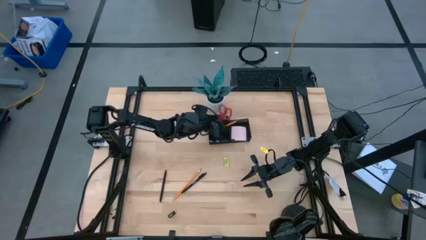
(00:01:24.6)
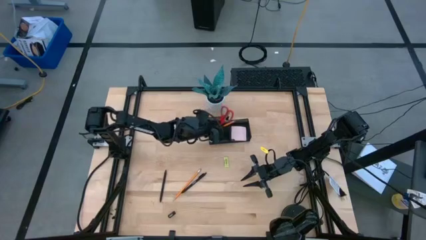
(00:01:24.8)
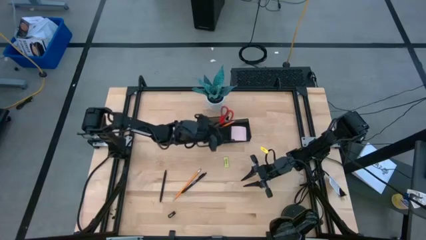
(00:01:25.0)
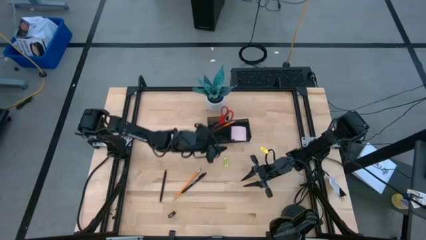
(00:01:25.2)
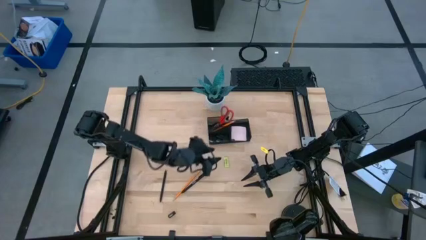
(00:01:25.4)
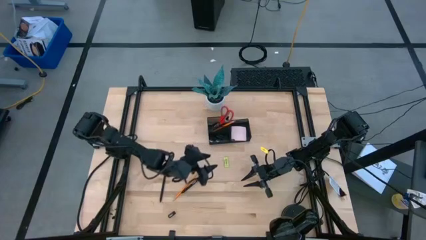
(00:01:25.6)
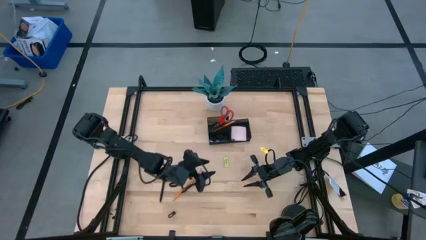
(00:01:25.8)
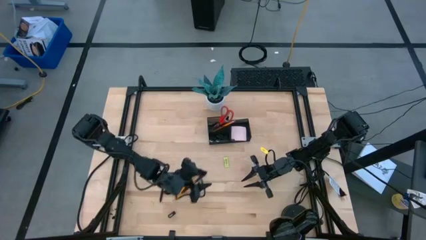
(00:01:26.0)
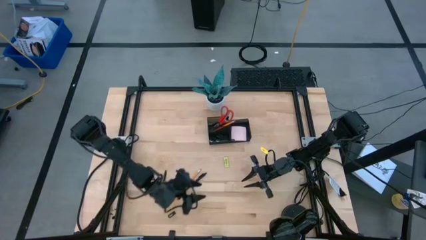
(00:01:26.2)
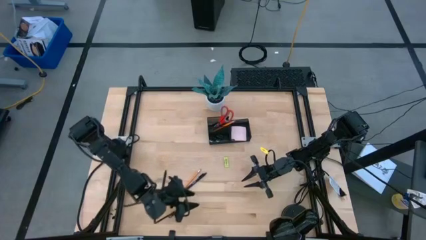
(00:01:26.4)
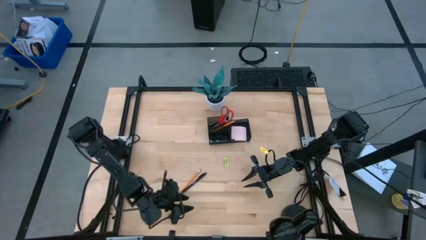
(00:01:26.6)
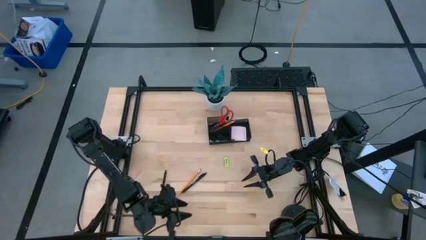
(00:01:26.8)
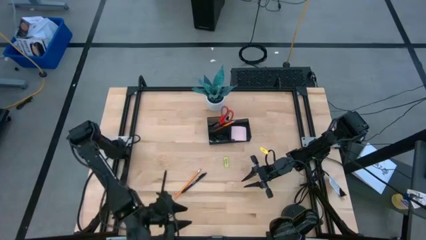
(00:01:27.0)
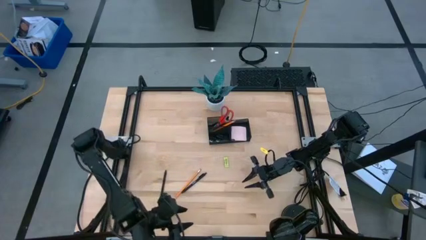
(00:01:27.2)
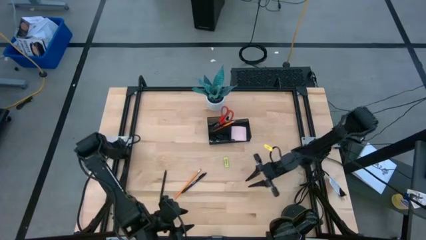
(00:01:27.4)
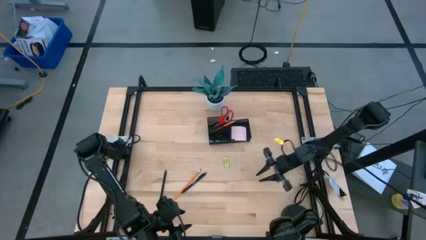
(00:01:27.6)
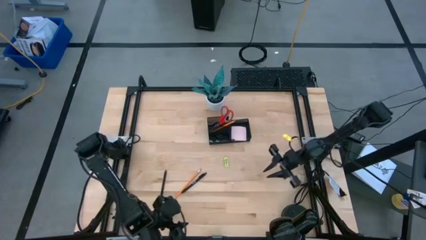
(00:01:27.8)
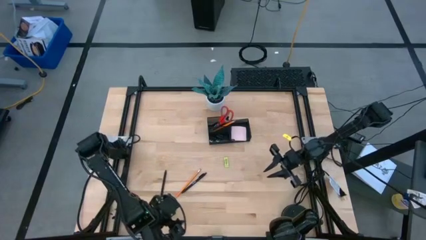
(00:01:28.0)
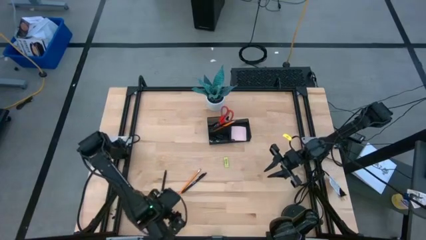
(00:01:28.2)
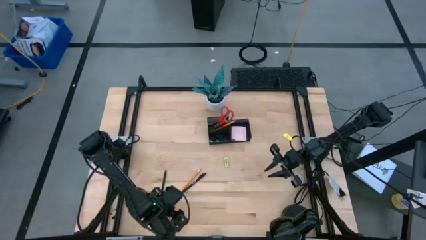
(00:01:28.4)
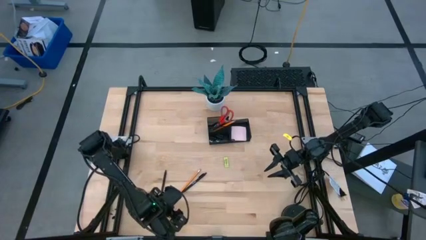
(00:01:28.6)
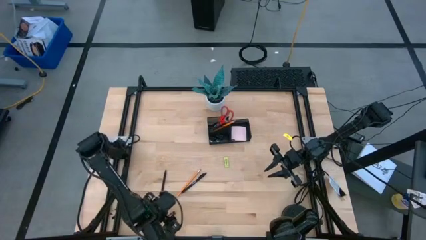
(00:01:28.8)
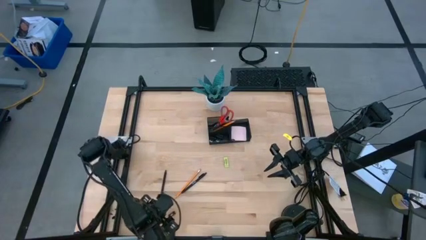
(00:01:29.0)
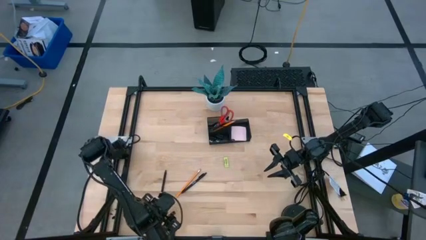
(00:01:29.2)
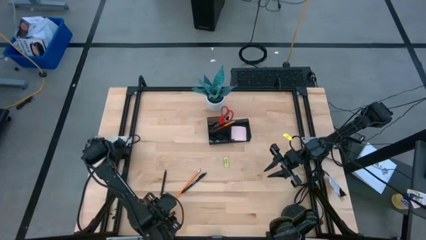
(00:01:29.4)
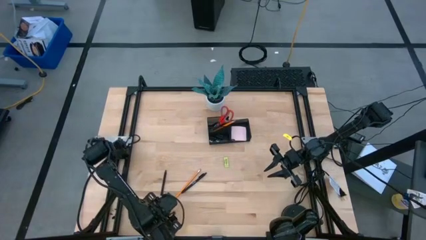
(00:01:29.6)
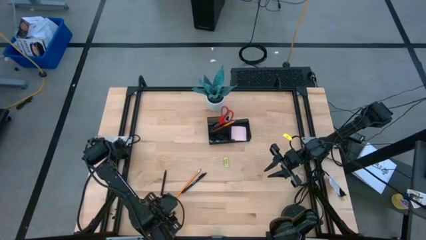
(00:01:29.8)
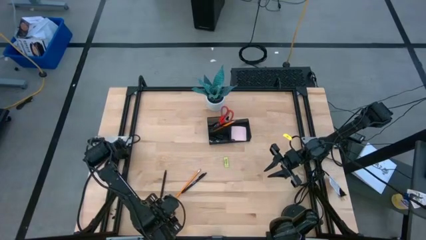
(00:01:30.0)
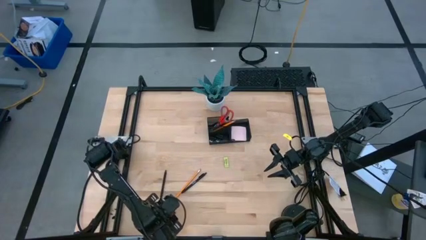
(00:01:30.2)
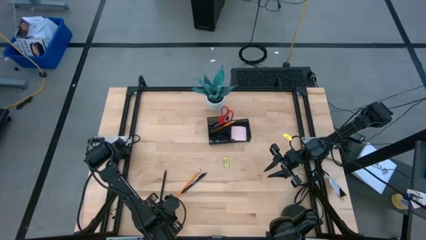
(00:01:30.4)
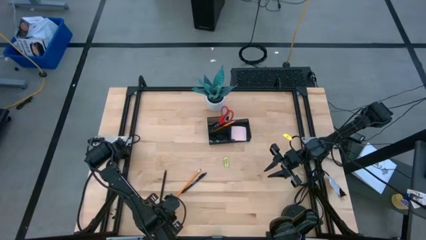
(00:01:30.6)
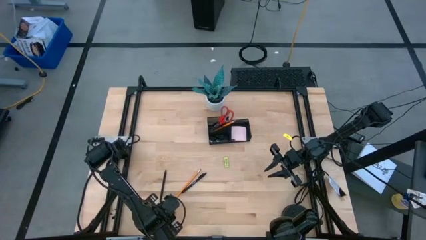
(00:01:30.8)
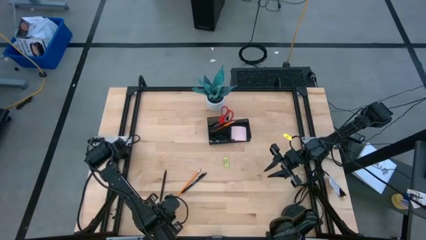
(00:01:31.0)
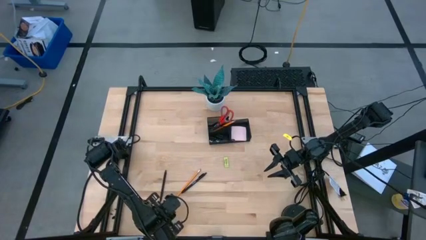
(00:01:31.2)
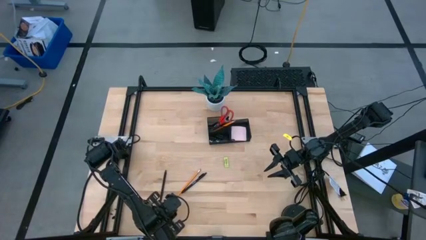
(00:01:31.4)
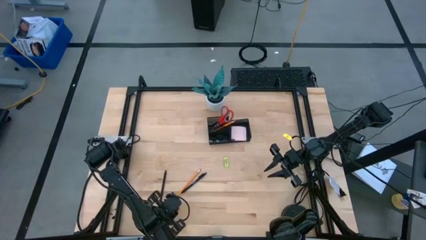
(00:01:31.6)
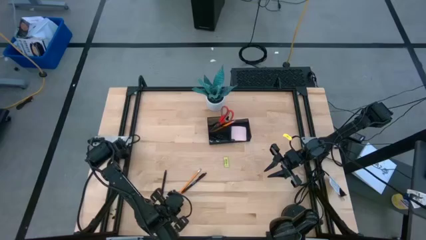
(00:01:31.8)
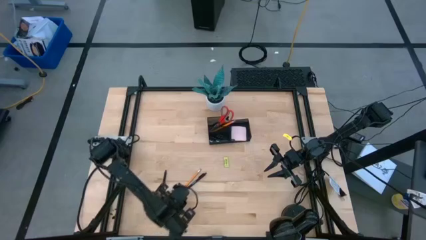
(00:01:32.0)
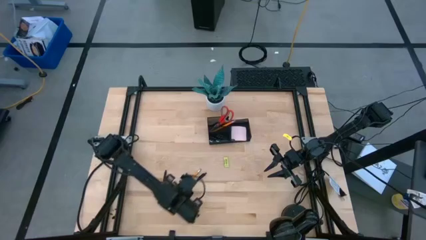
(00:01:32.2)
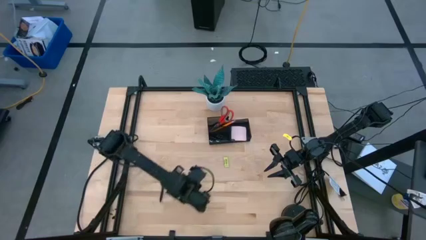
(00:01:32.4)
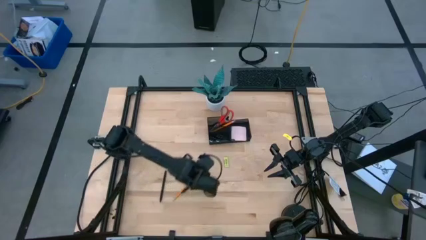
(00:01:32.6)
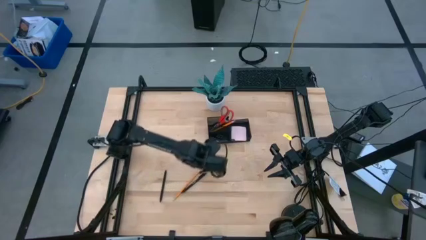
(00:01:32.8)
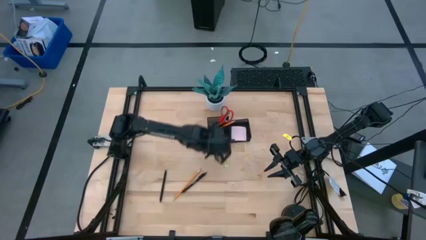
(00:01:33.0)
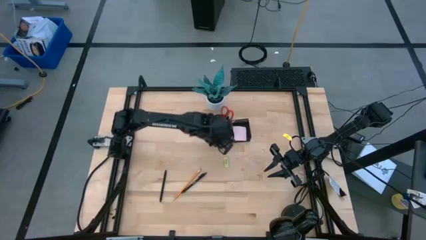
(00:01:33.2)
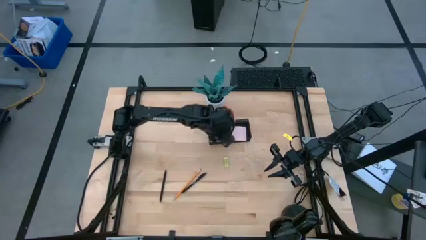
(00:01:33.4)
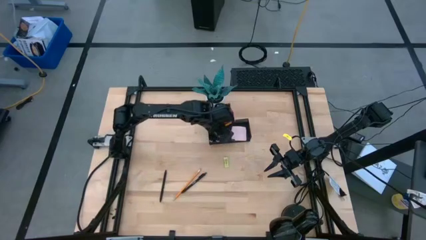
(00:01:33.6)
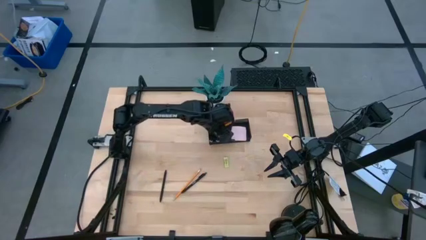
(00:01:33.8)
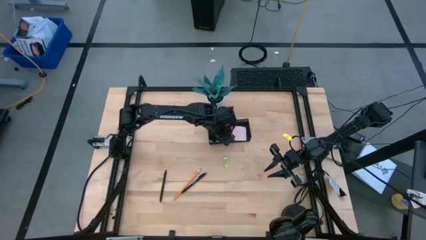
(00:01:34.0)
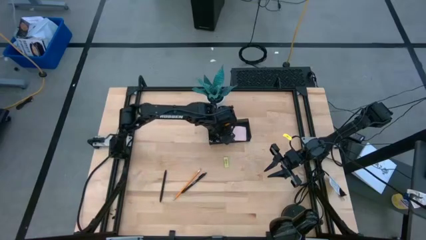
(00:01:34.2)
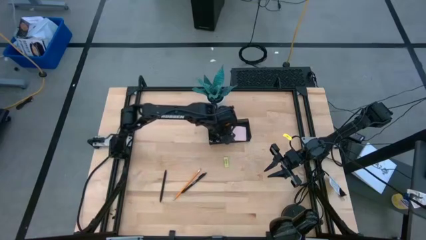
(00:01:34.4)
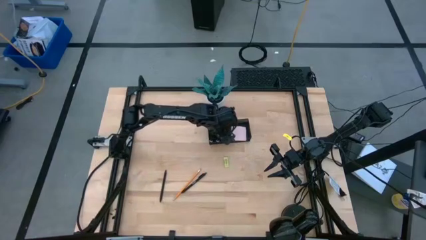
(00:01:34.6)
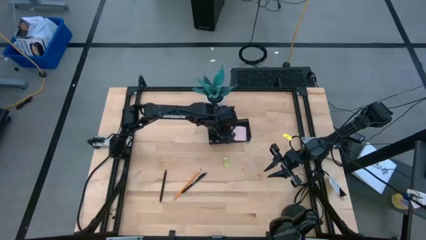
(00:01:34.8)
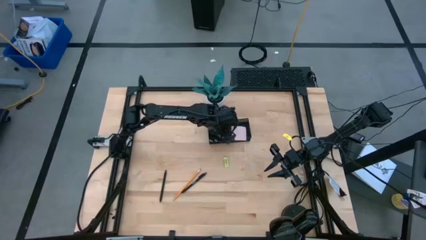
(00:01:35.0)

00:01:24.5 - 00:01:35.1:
Task: Pick and place office supplies into organizer
Put the black binder clip into the black desk organizer

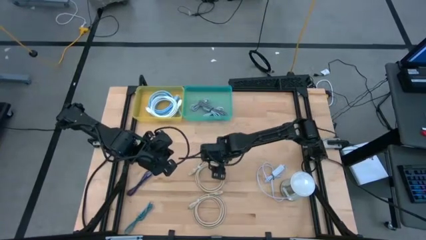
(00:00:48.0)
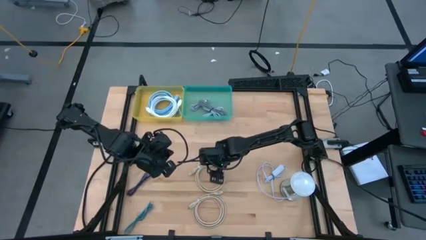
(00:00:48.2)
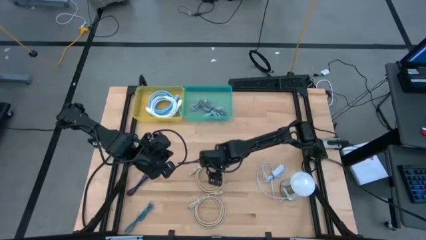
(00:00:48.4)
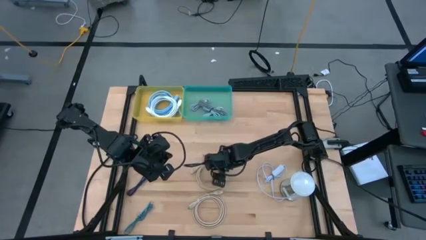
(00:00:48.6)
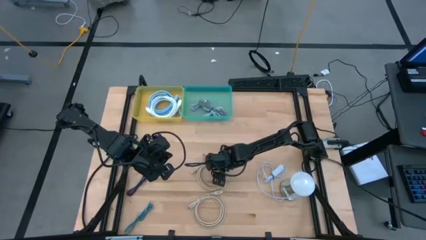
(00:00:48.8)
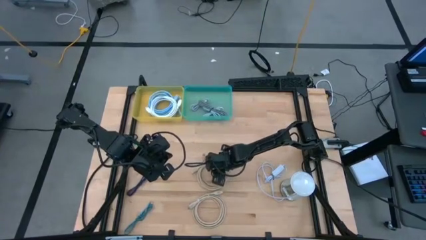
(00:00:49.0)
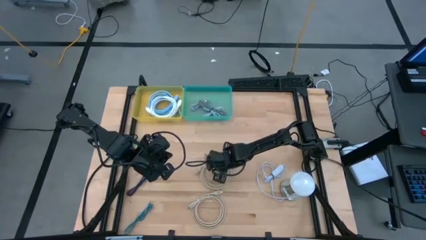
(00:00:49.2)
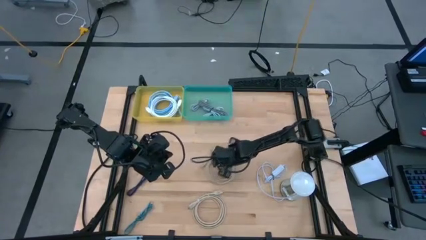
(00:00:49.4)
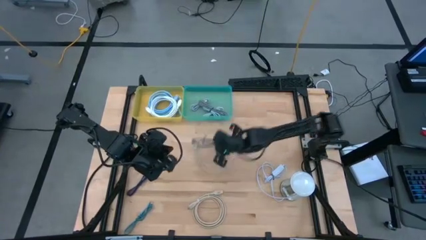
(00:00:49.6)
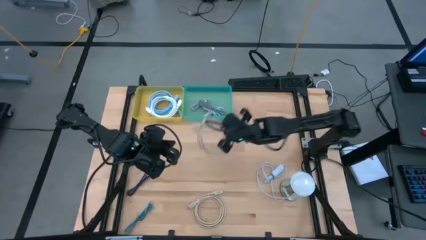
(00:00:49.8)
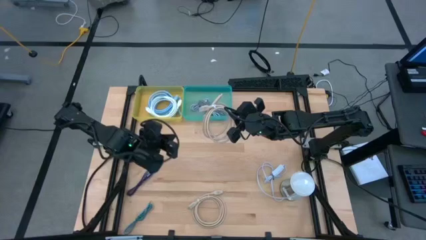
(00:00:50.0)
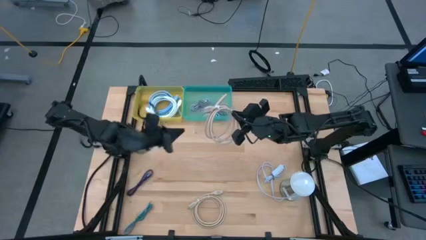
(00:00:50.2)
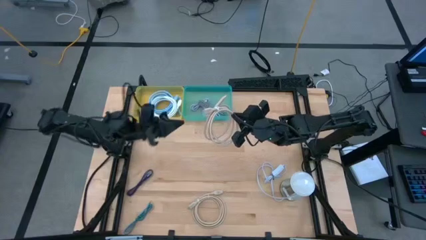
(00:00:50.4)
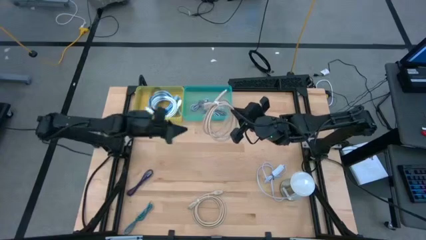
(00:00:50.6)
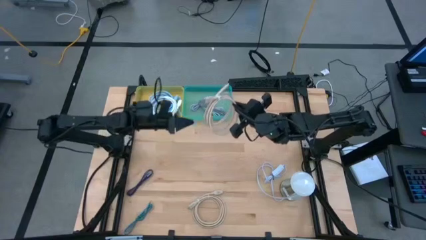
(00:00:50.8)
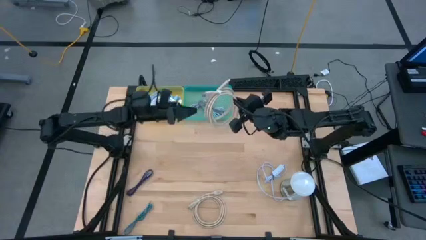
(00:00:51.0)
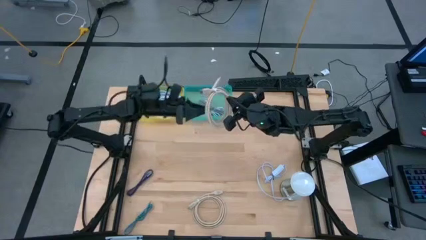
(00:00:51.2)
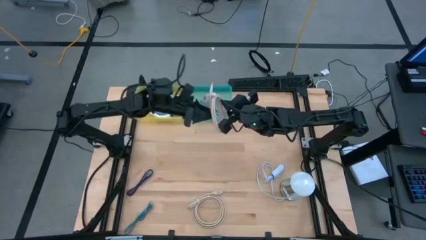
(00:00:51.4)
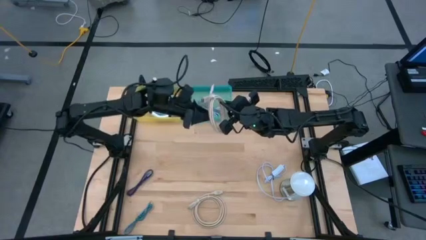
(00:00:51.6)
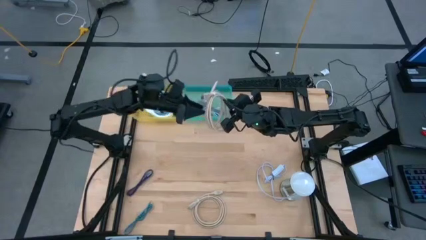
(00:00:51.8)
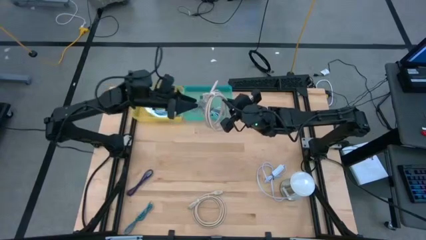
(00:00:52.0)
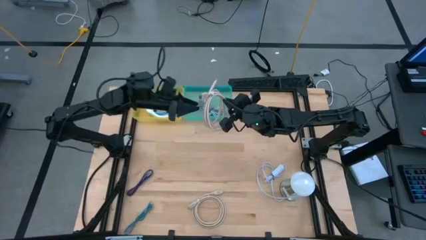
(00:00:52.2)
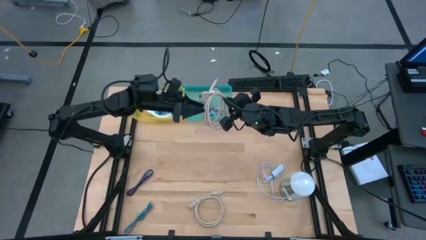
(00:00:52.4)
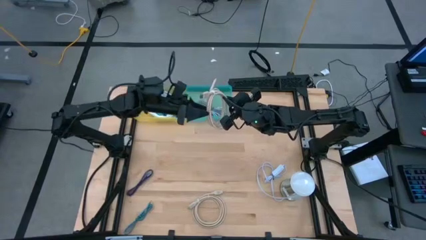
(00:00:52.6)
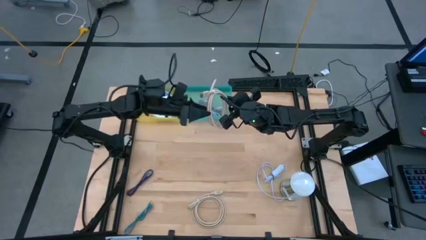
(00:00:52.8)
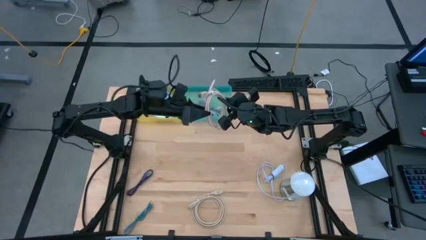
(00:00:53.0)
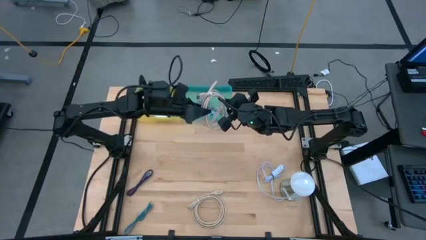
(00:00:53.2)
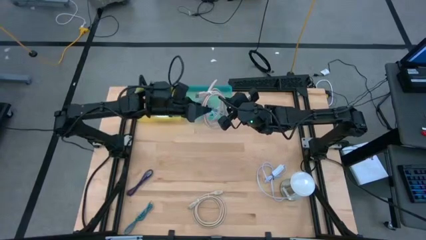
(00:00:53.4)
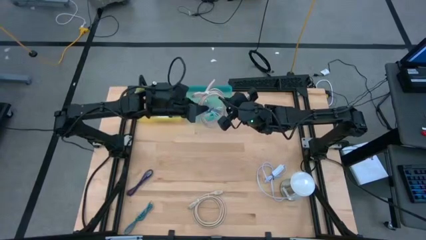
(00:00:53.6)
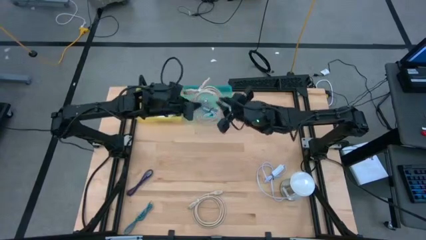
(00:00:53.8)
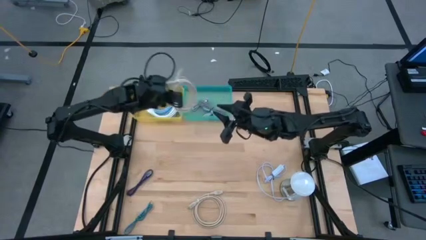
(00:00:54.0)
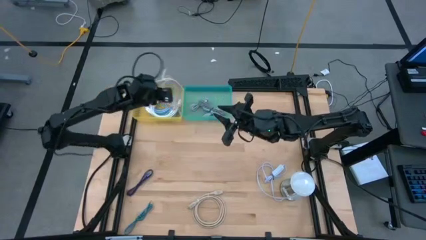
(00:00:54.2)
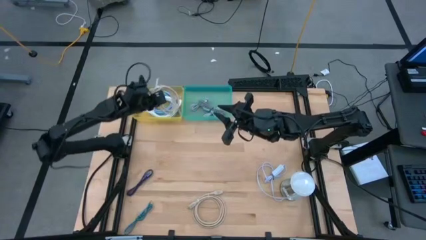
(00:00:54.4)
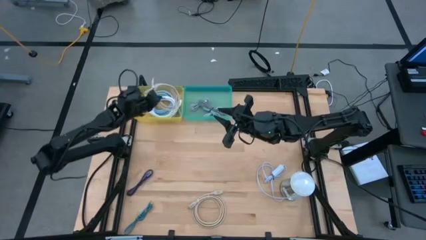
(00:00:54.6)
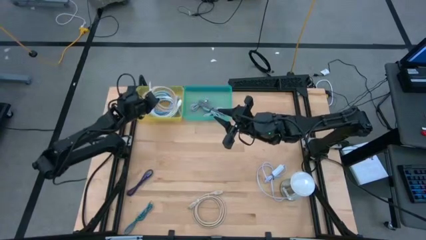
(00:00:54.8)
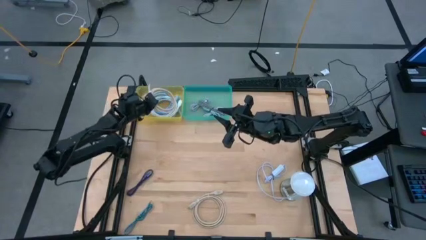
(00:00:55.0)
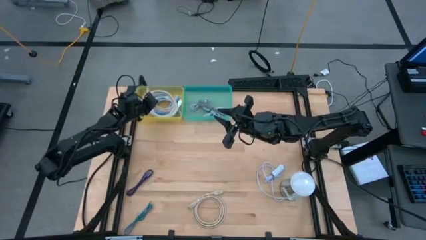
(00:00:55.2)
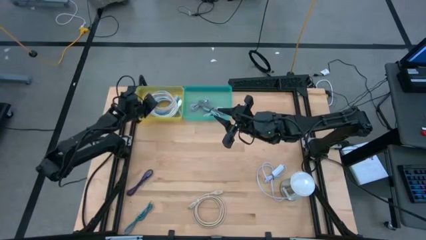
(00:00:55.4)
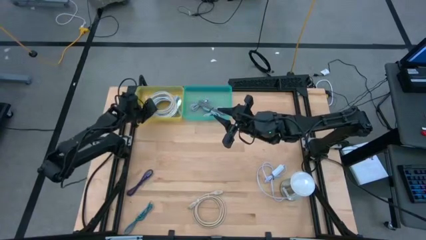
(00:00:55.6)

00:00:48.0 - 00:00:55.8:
Task: Pick & Place USB Port
Put the top brown HDMI cable into the yellow bin
